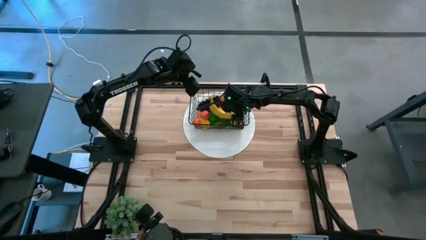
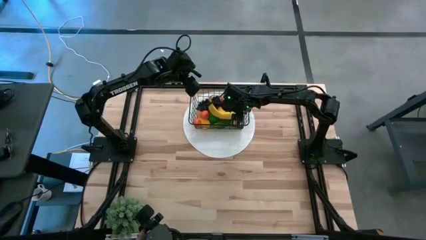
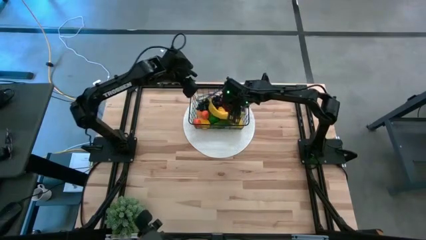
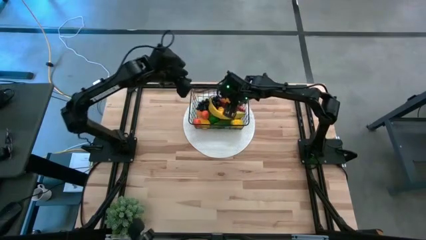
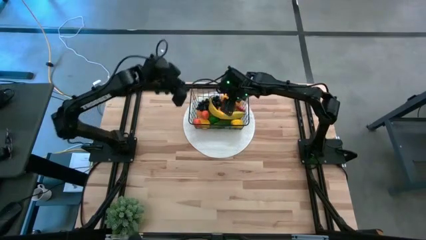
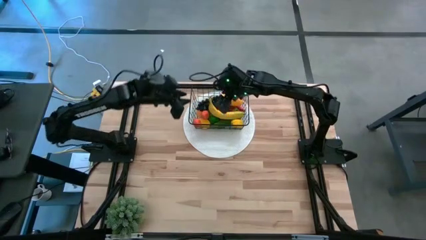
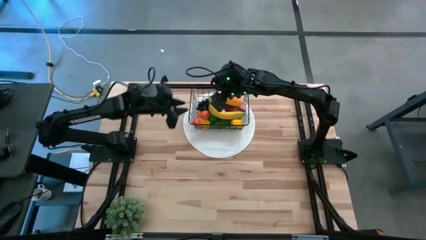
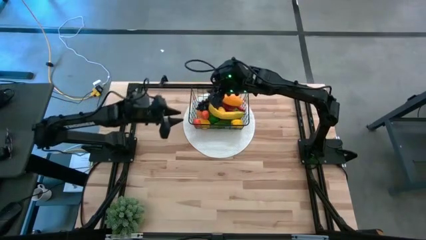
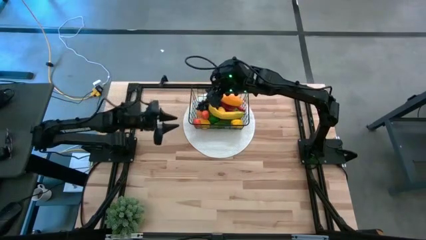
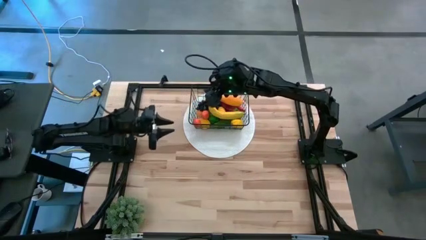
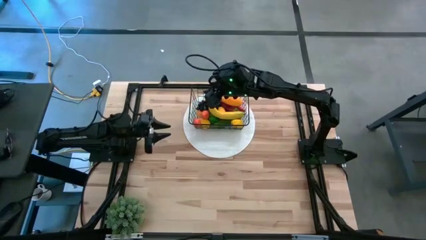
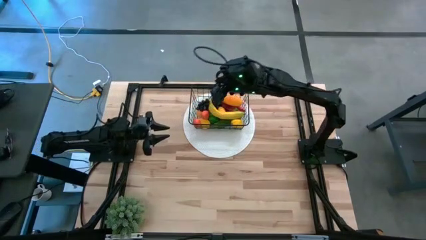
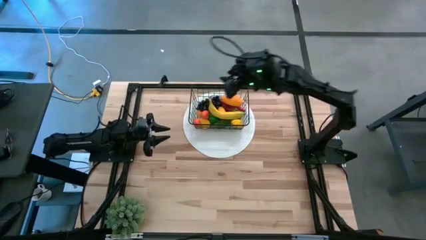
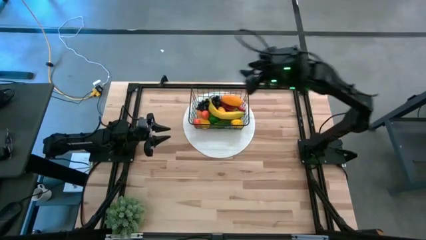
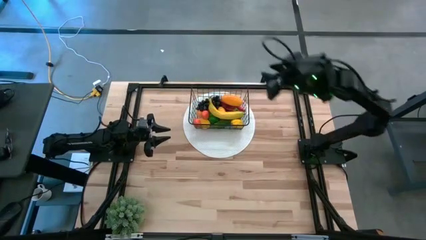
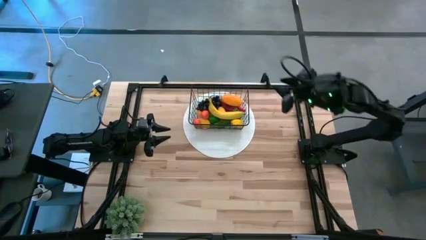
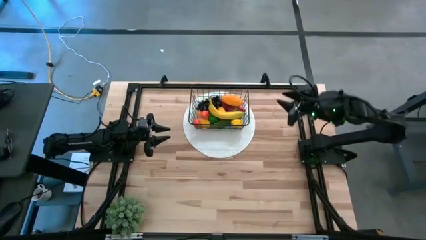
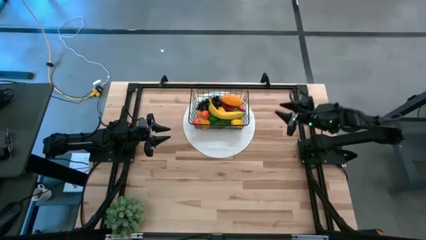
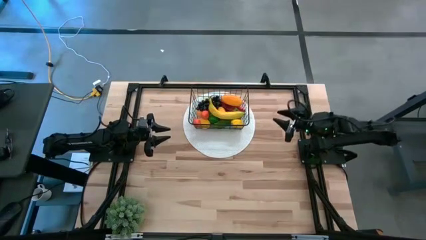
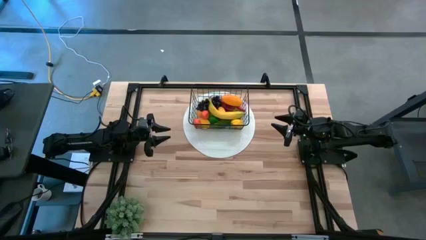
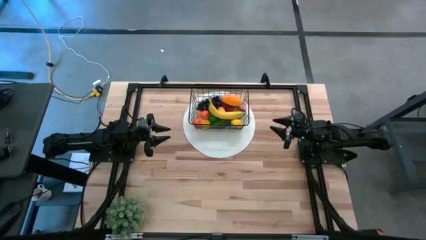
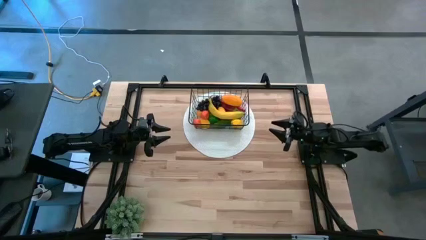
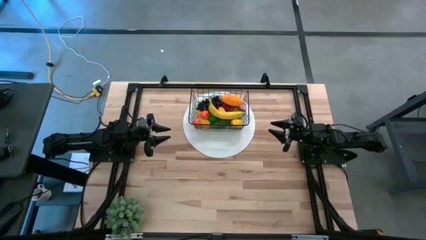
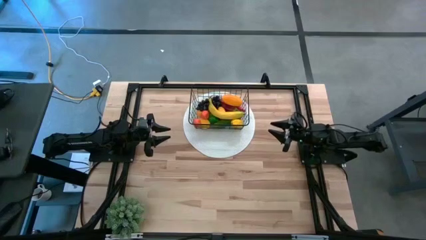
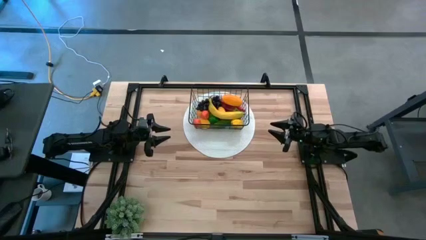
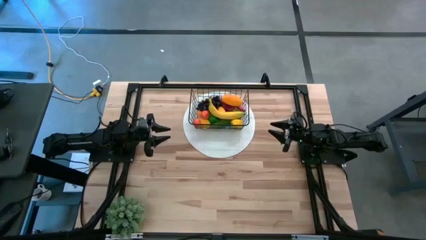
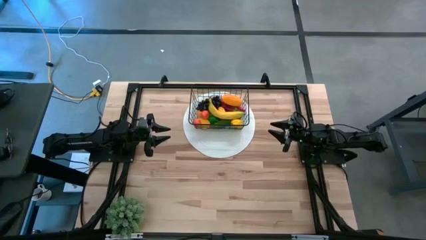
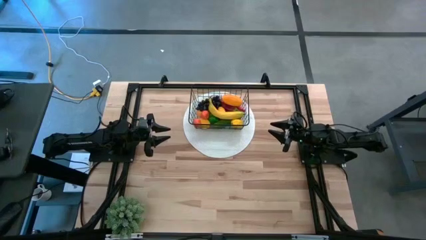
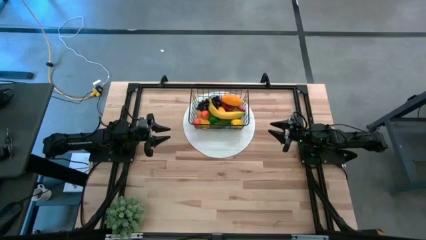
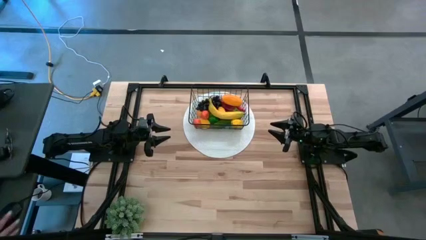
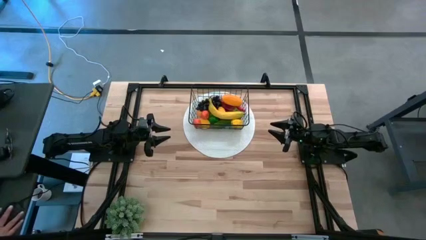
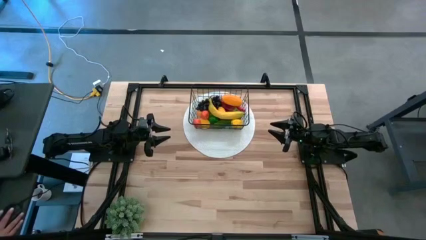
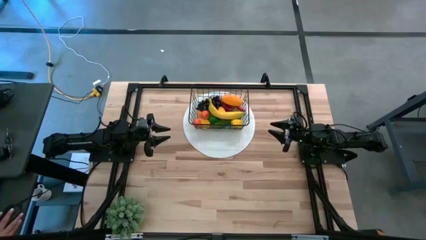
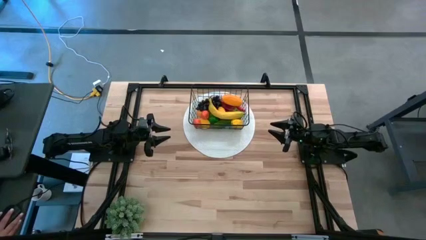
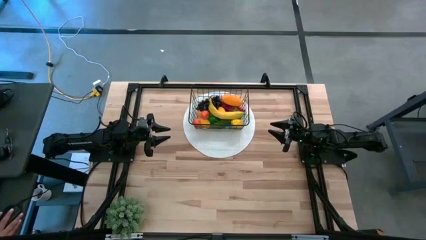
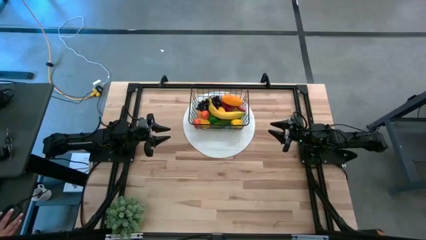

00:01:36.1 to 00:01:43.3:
Task: Build produce basket
Return to Home Position

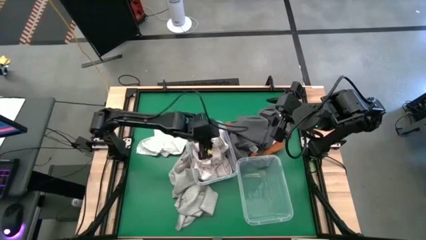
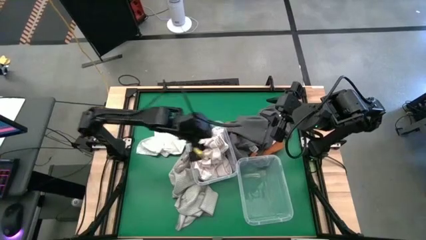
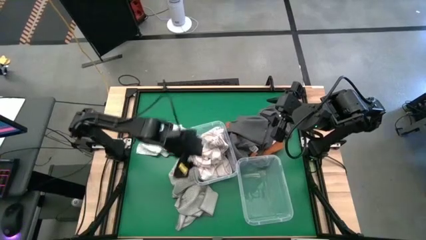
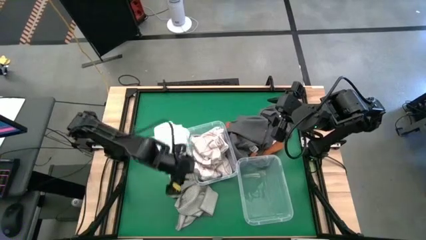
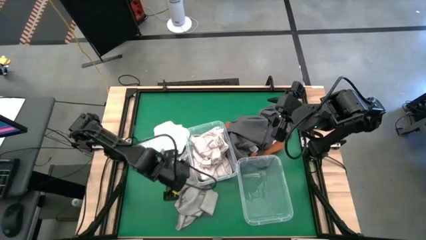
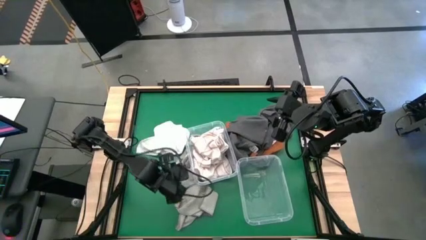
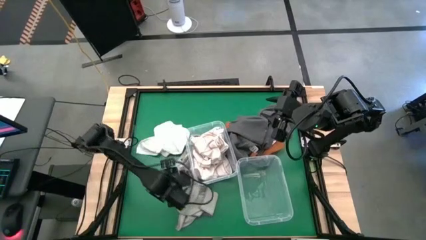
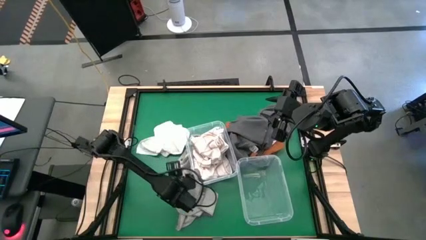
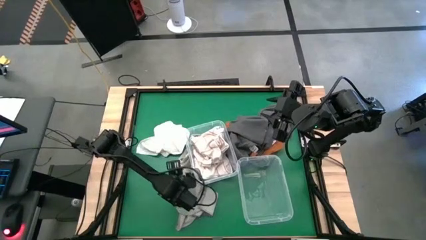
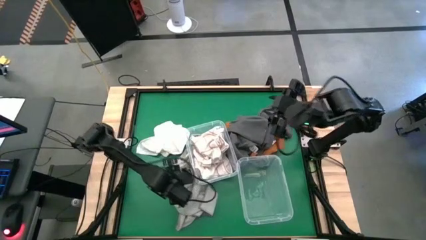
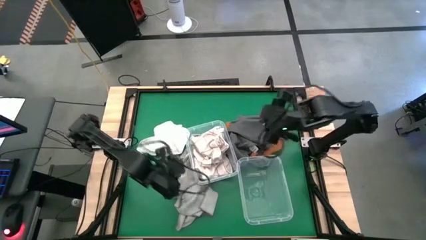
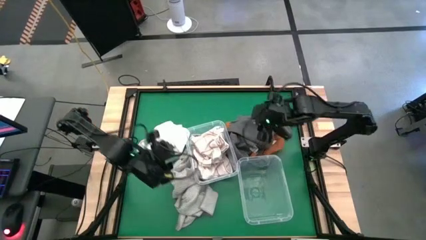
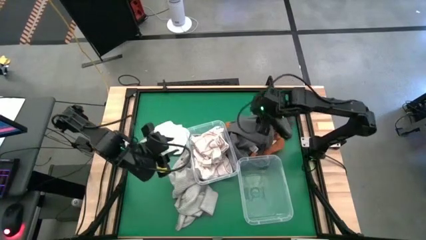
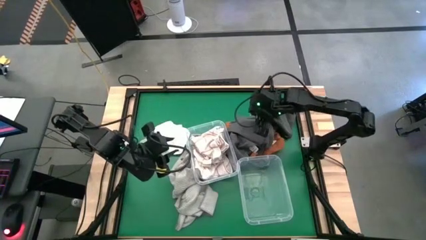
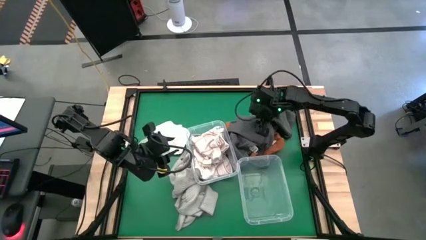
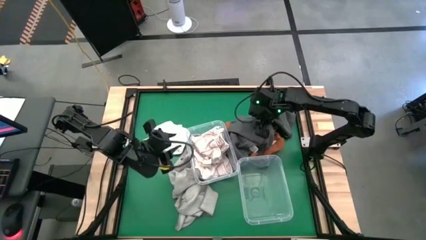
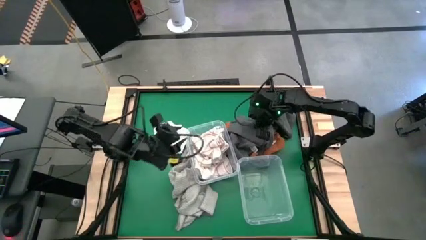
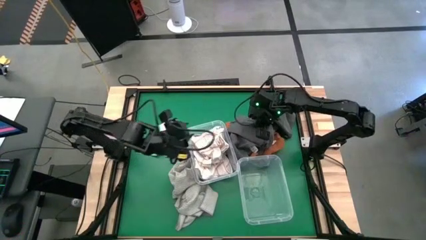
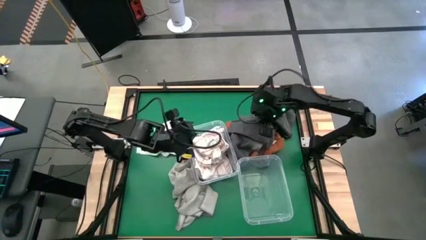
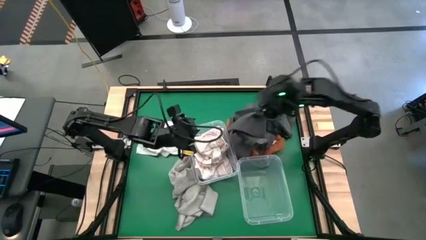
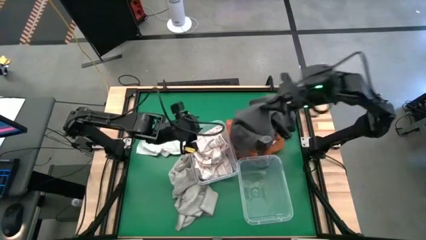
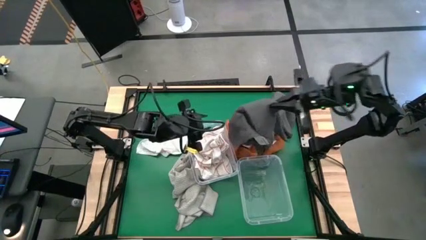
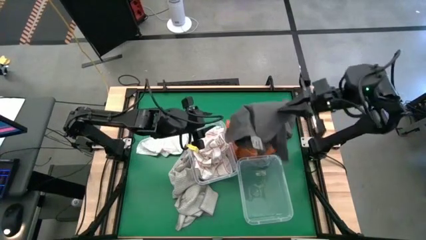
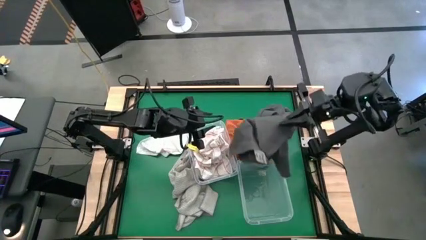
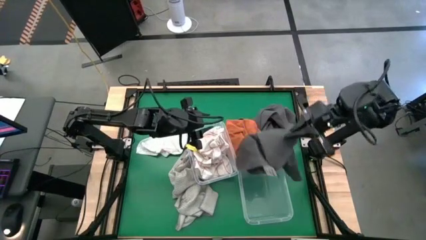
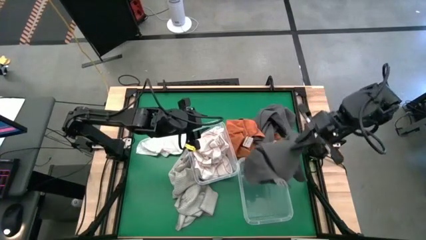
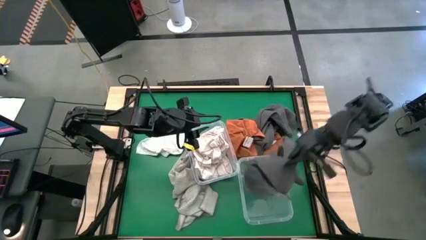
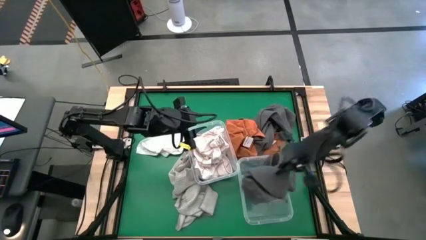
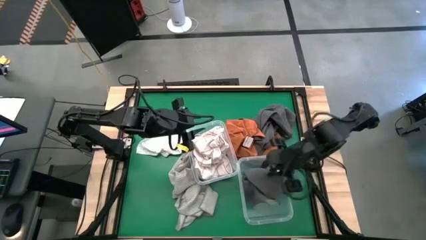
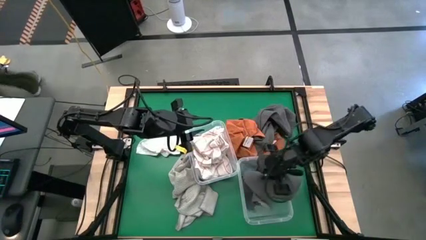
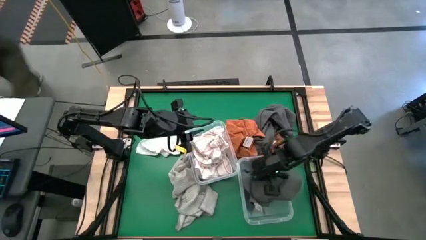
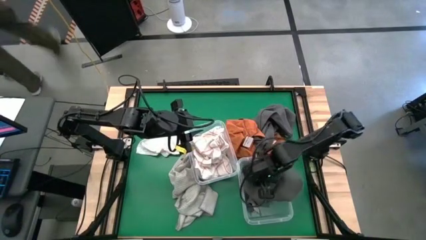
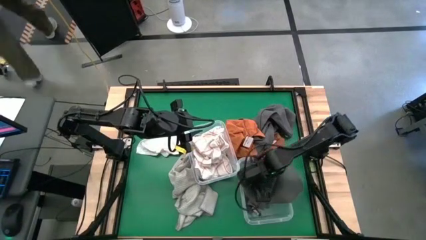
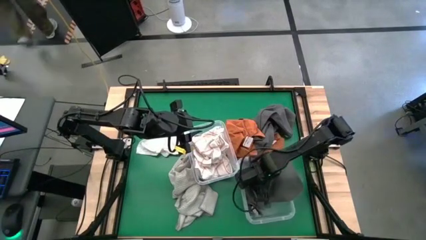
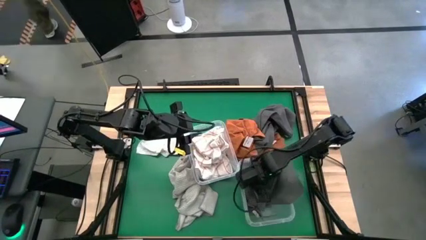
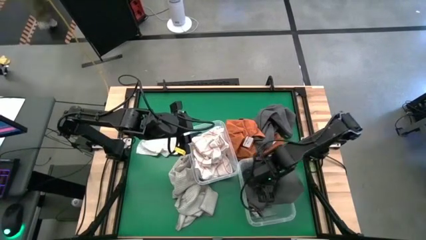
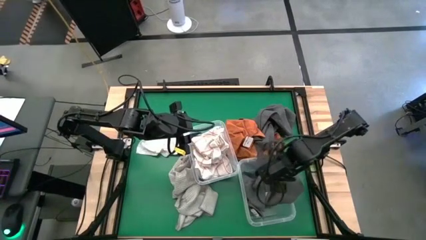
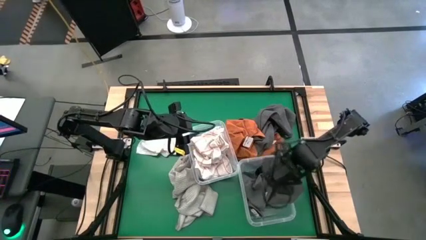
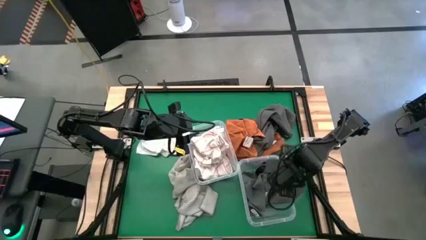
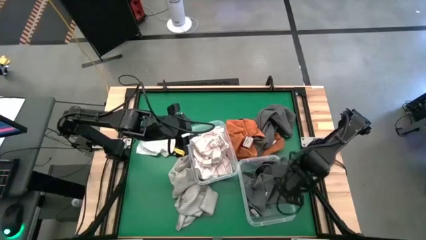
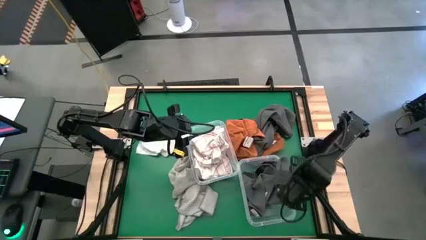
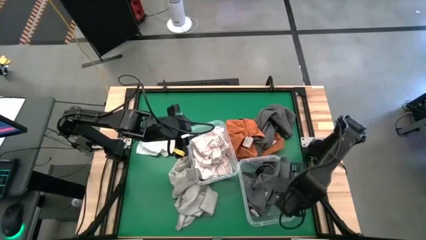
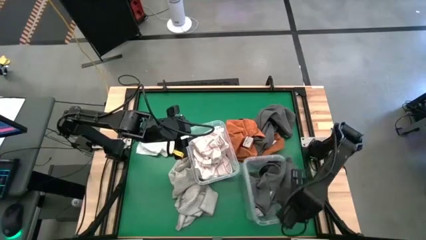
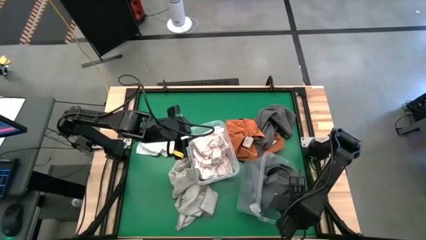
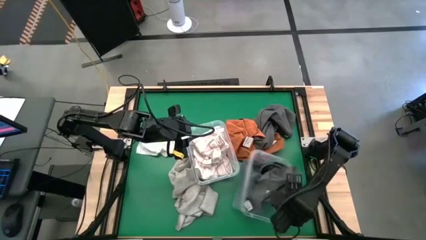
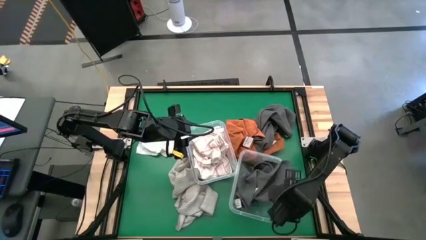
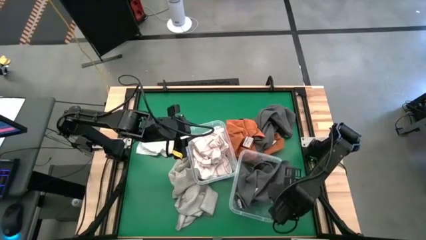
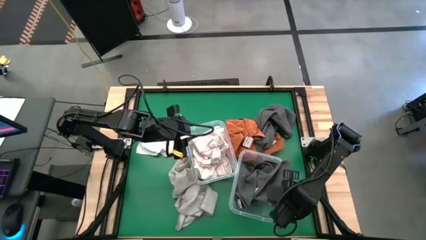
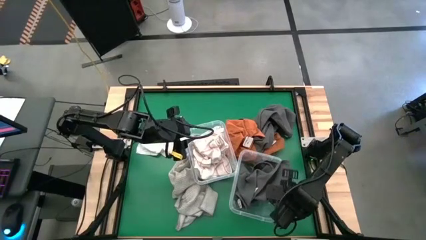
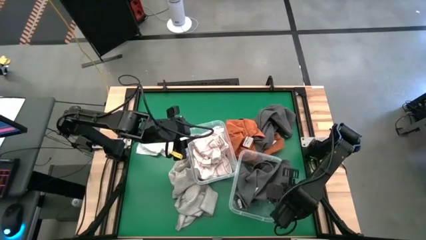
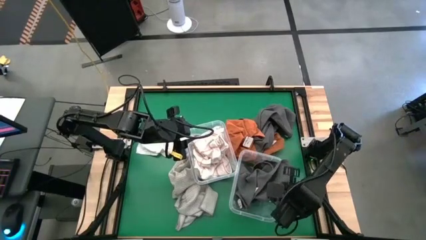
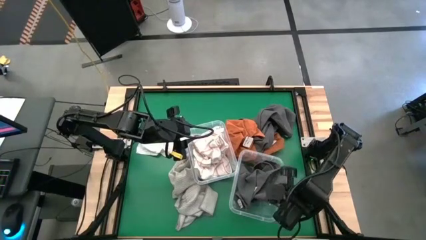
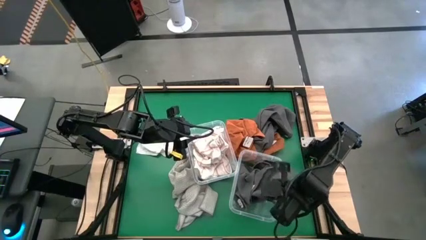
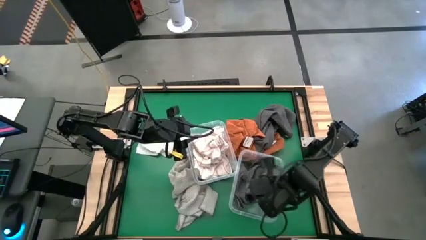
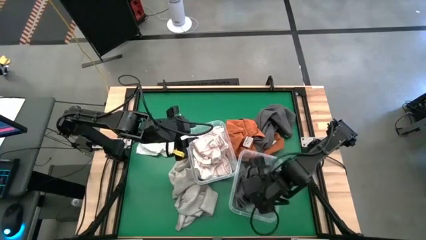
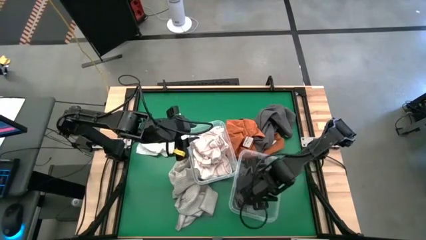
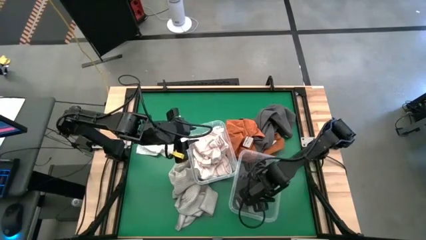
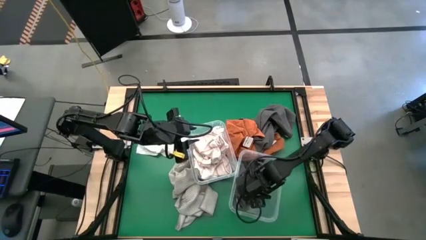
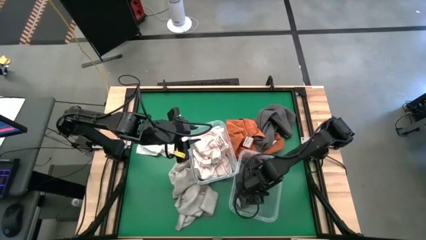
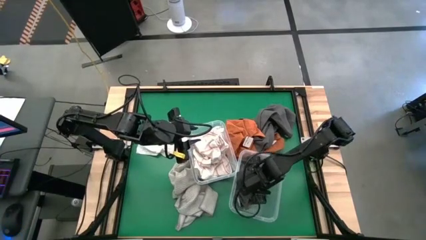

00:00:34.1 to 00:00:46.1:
Task: Sort microfiber towel by color & place in baskets
Put the grey microfiber towel into the right transparent bin
